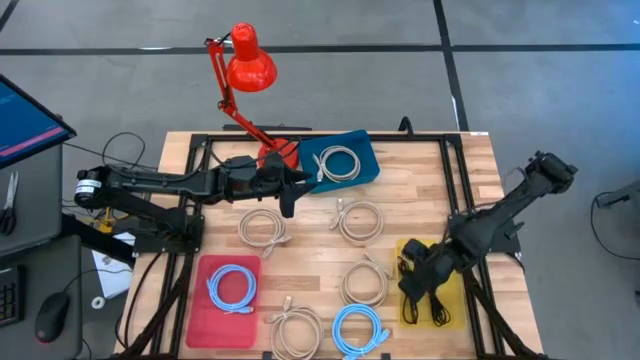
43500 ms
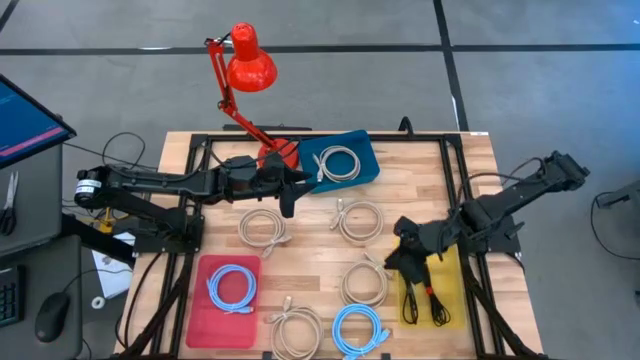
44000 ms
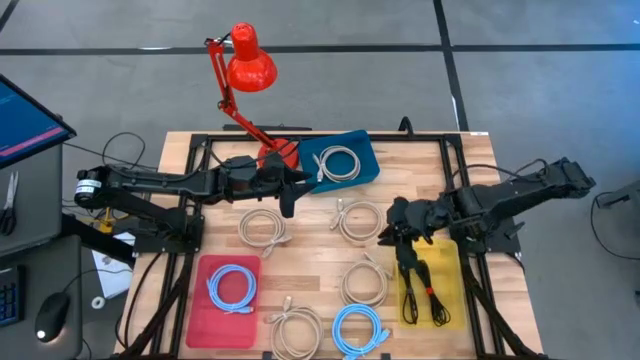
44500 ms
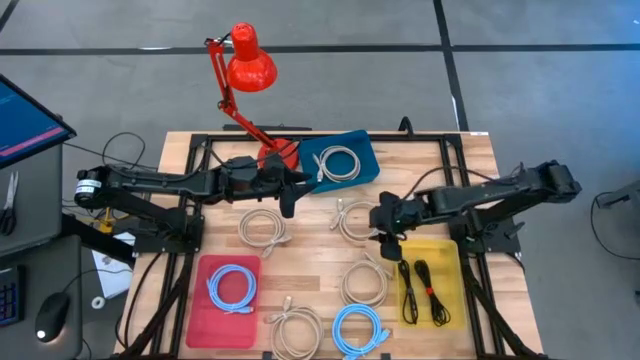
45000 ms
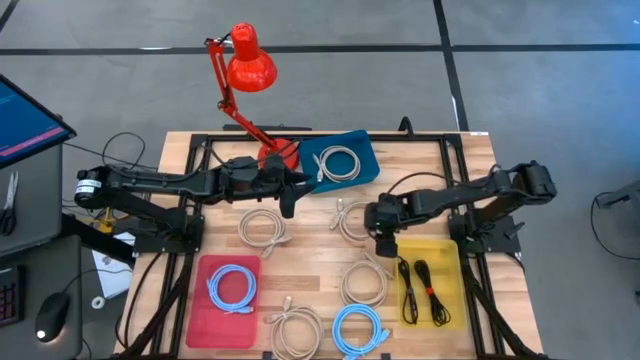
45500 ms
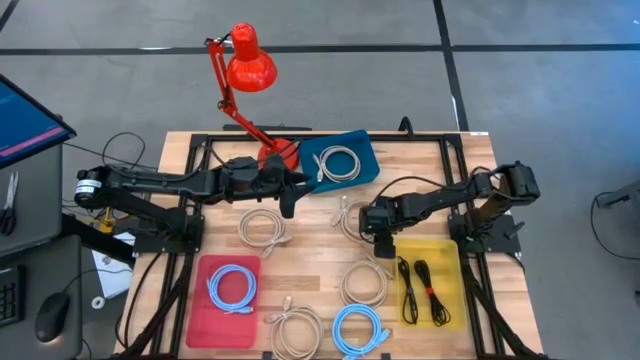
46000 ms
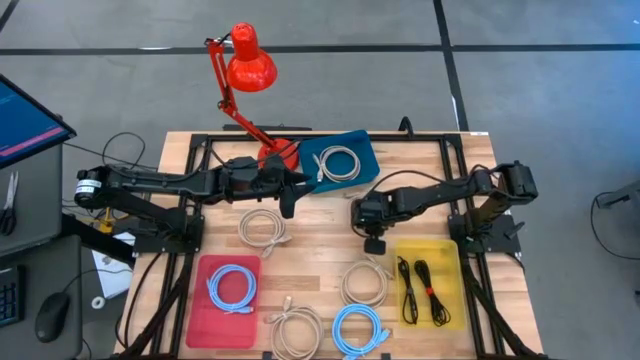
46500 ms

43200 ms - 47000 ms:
Task: Sort HDMI cables
Put the brown HDMI cable into the blue bin

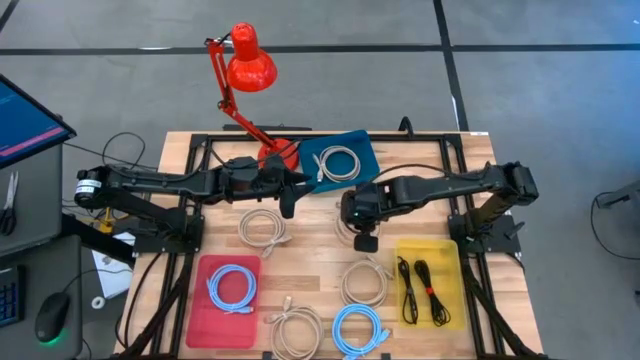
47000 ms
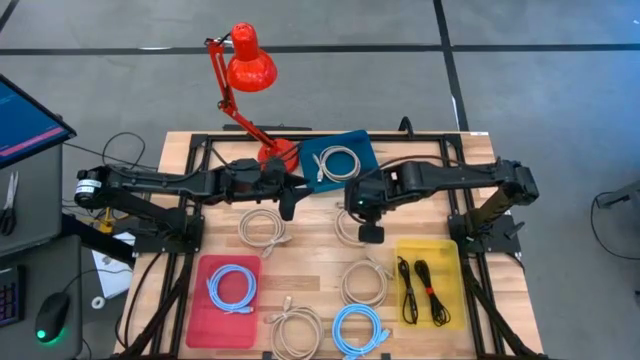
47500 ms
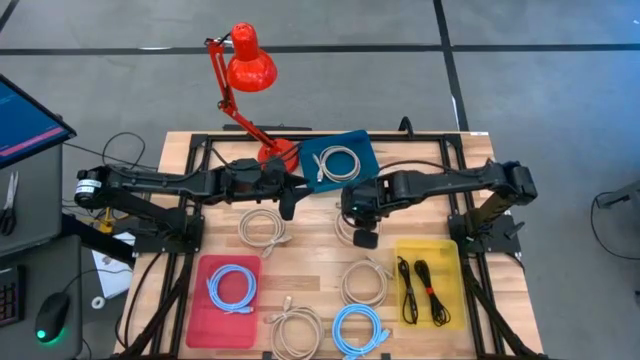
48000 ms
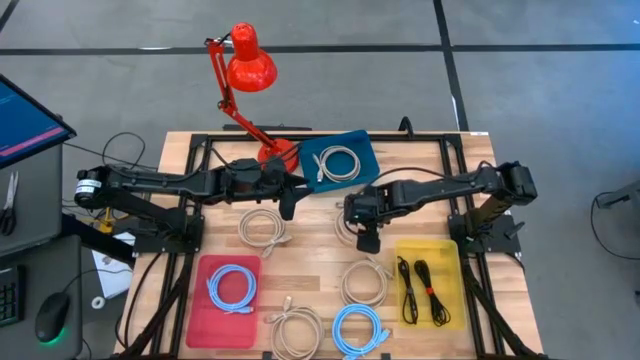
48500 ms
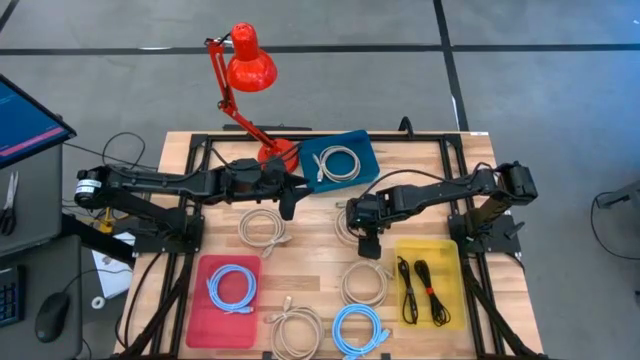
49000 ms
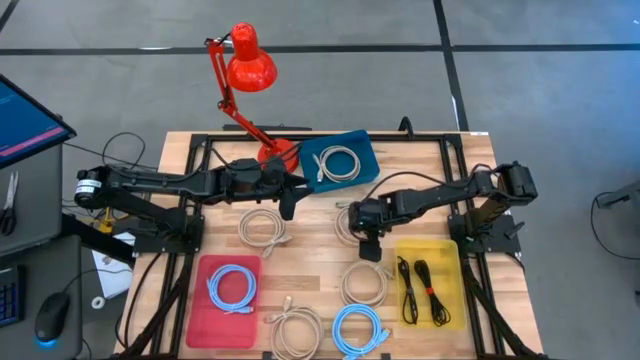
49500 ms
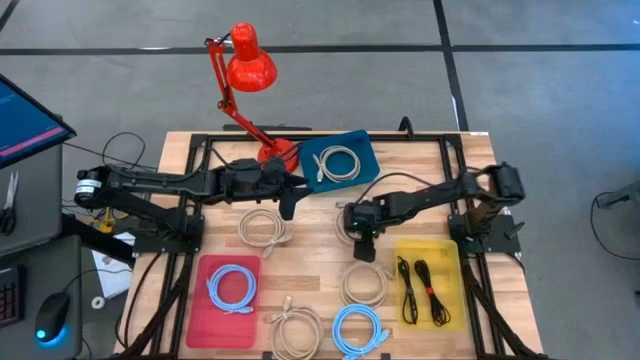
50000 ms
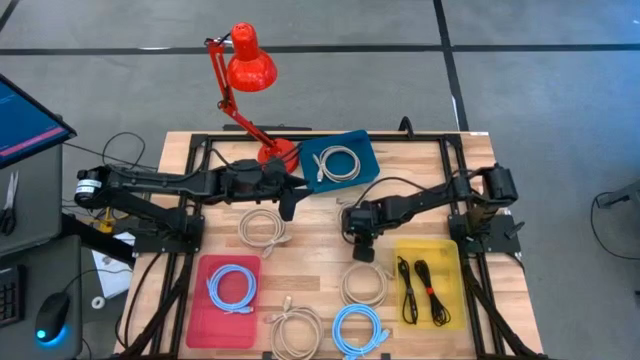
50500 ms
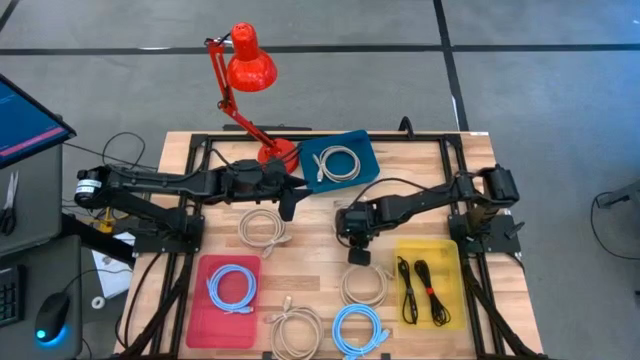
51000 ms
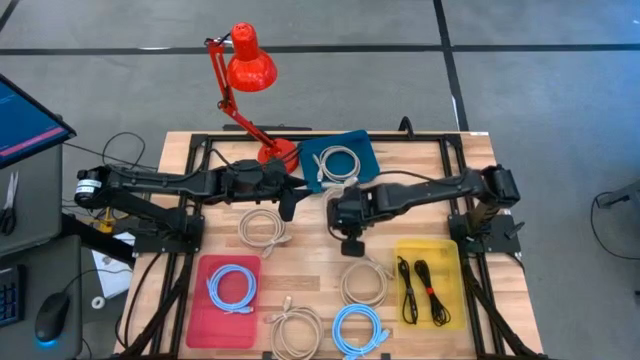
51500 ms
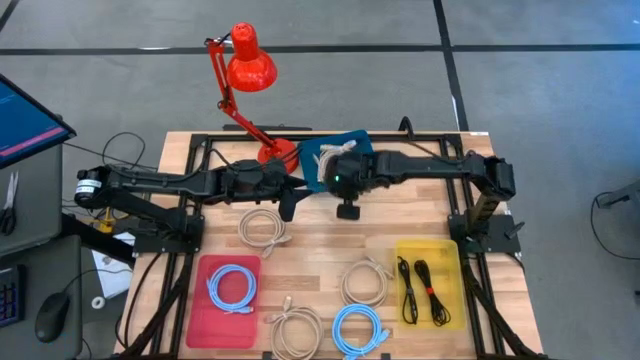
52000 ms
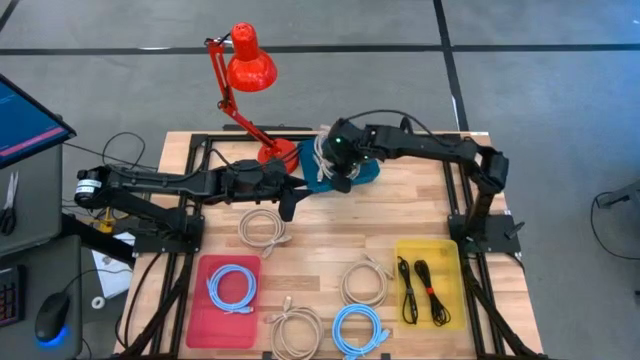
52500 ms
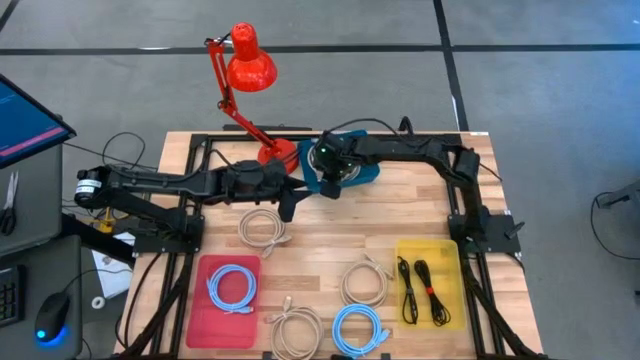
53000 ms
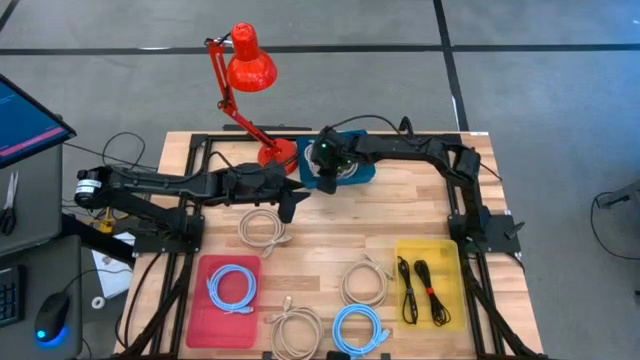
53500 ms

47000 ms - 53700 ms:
Put the brown HDMI cable into the blue bin

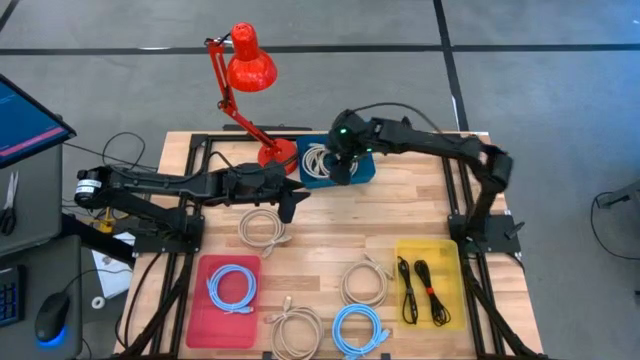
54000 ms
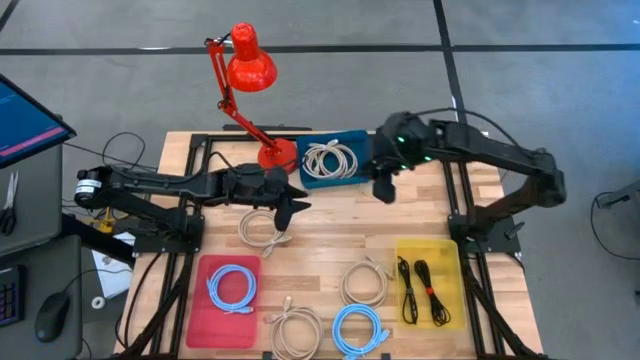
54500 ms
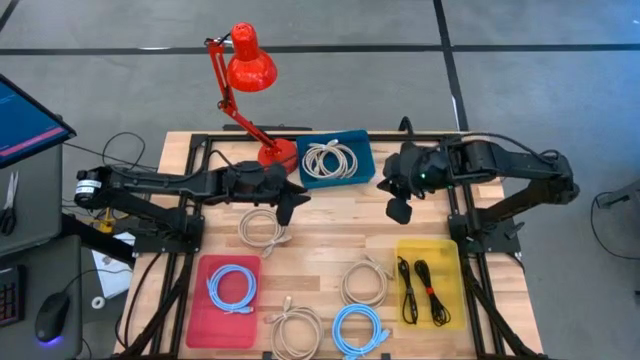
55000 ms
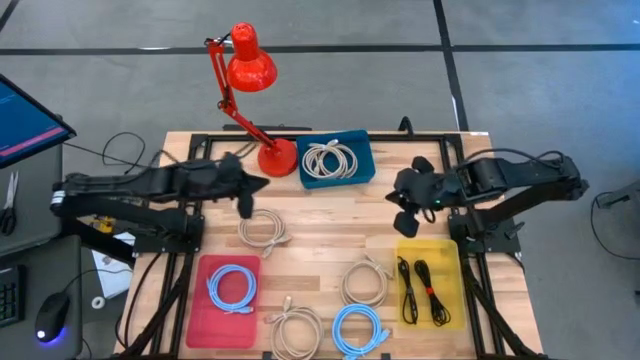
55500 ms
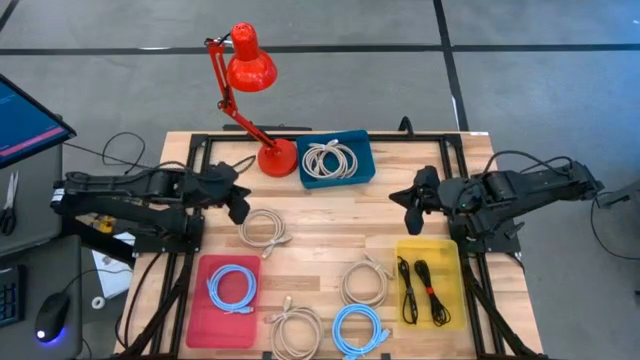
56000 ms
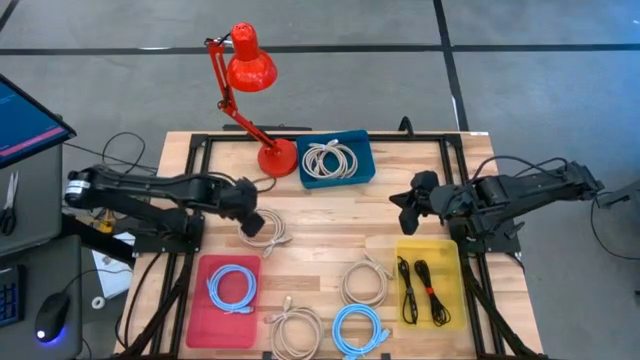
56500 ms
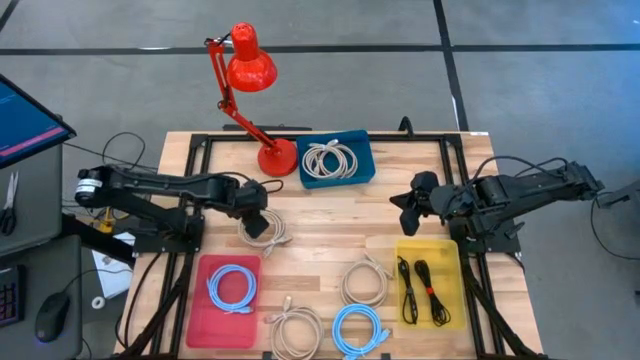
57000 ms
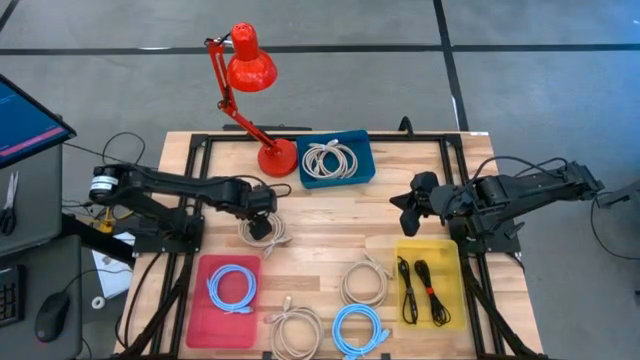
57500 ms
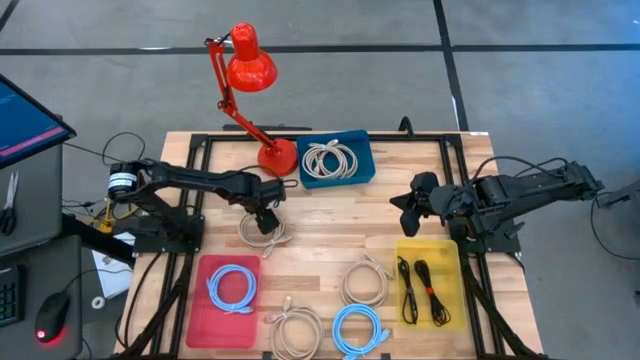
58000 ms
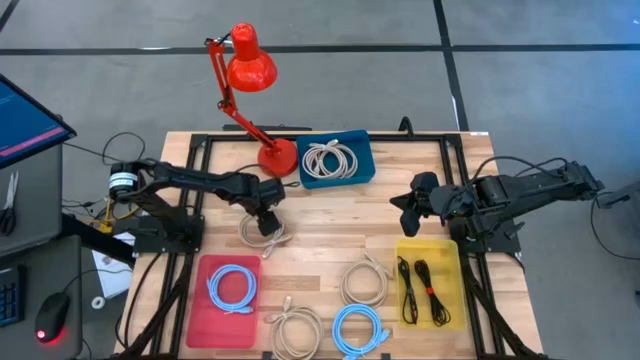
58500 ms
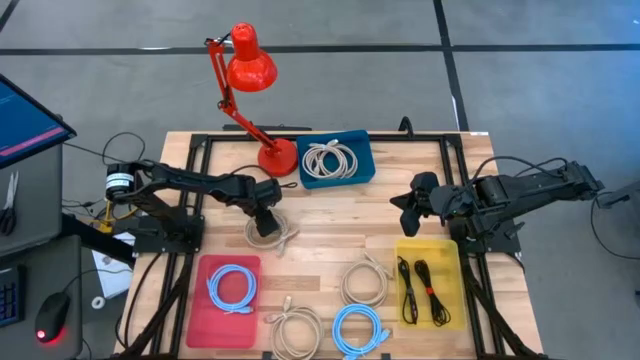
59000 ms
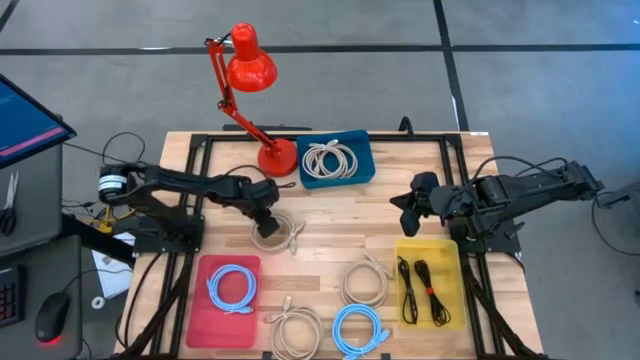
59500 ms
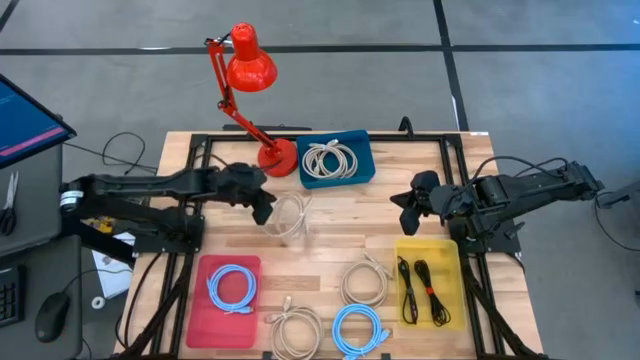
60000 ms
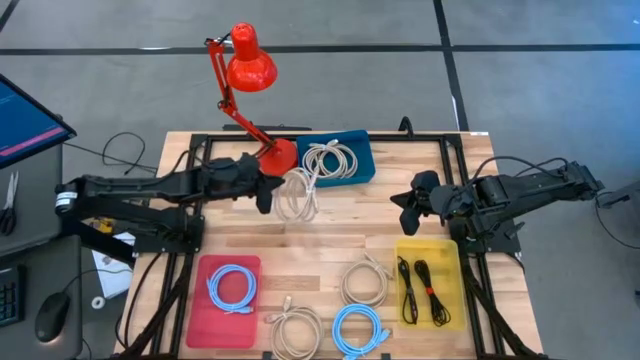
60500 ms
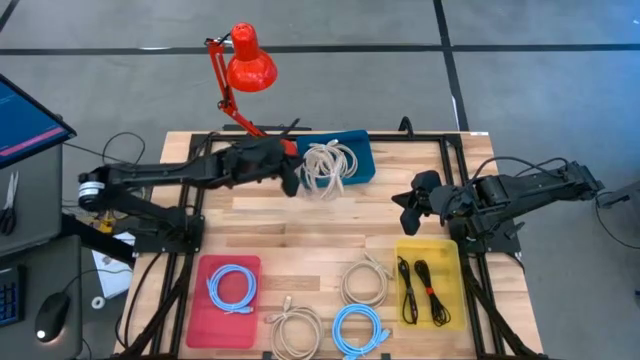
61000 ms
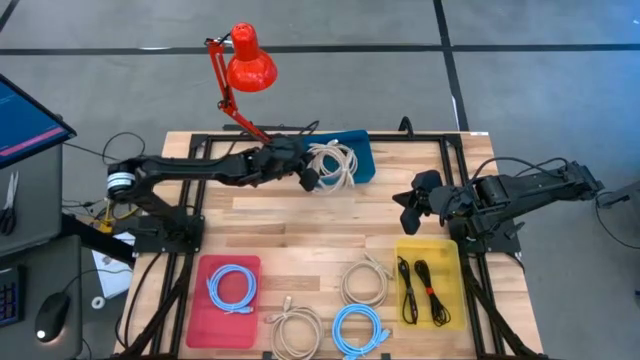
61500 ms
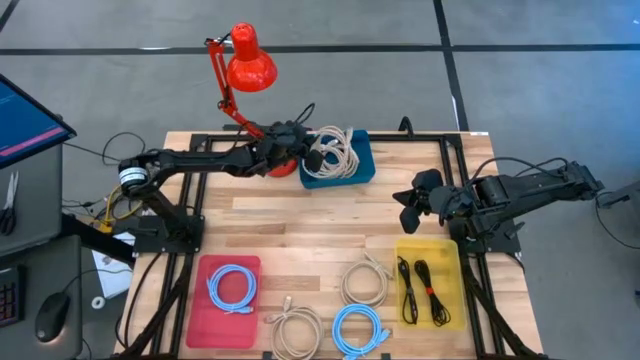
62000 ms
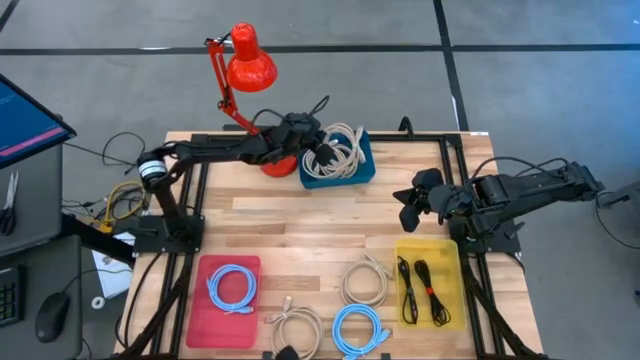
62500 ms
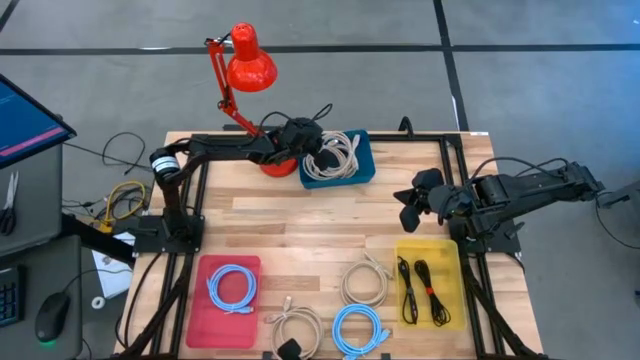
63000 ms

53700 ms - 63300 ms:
Put the brown HDMI cable into the blue bin

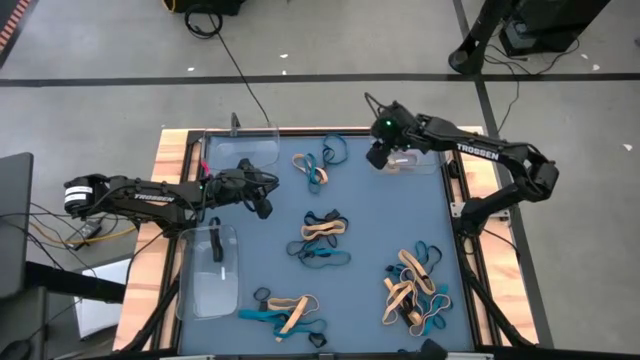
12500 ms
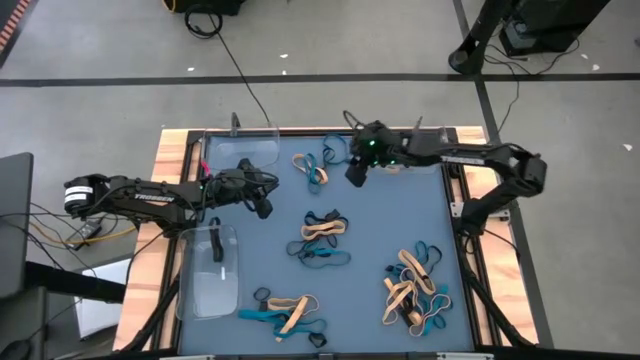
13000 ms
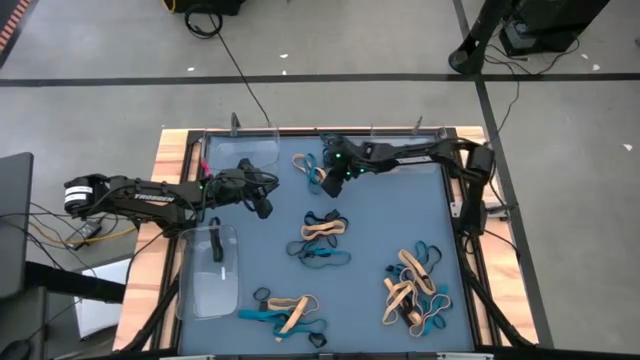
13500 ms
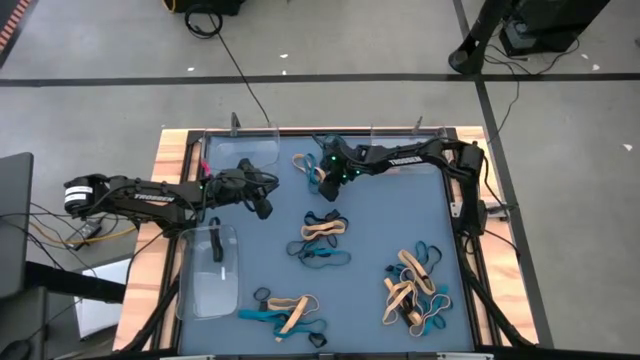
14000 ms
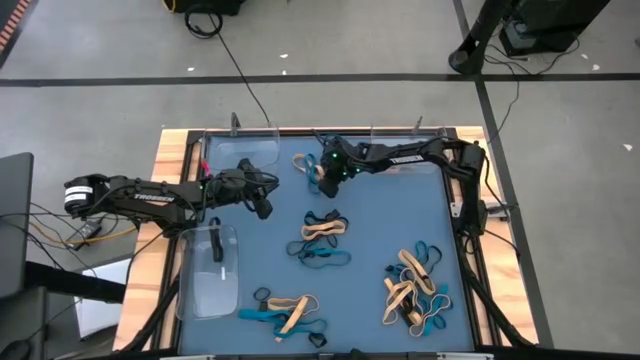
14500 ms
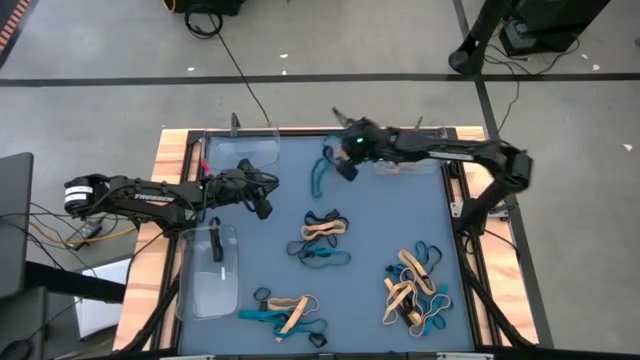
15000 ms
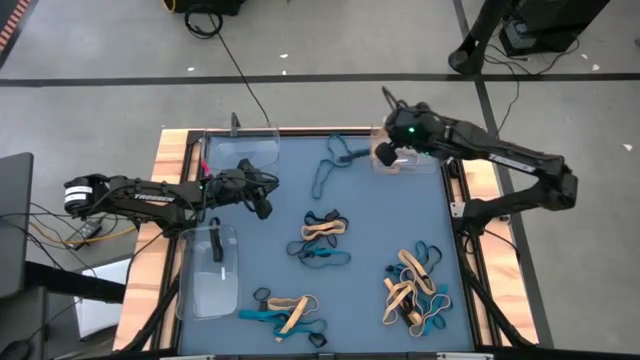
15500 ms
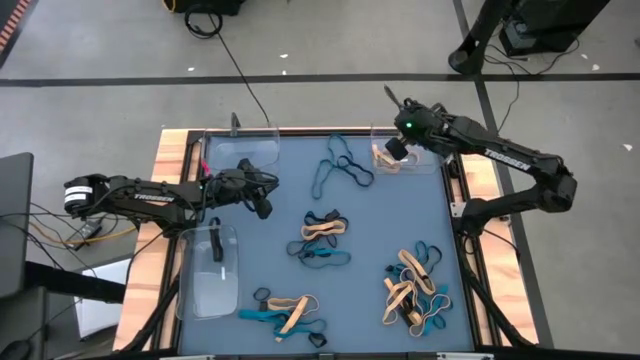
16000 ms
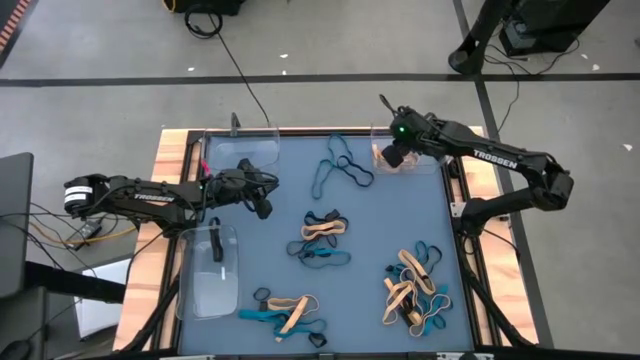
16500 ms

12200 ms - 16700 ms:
Task: Sort rubber bands into baskets
Put the yellow rubber band into the top right transparent bin
